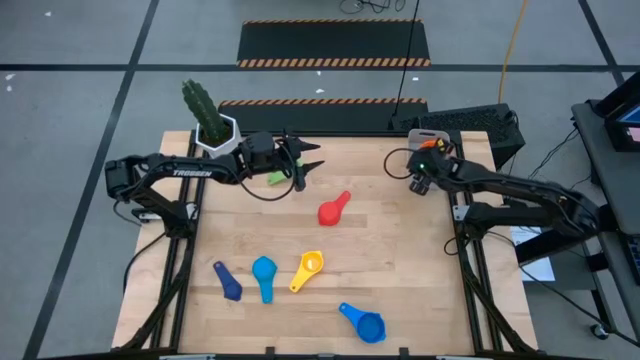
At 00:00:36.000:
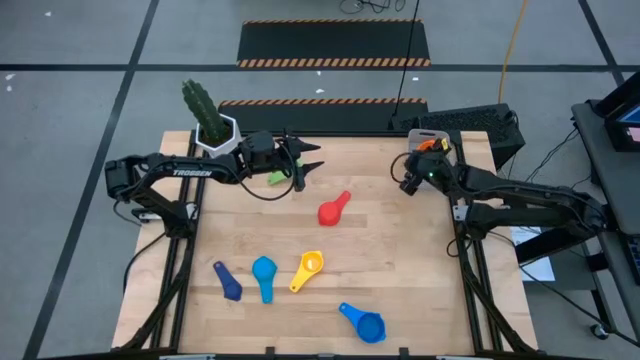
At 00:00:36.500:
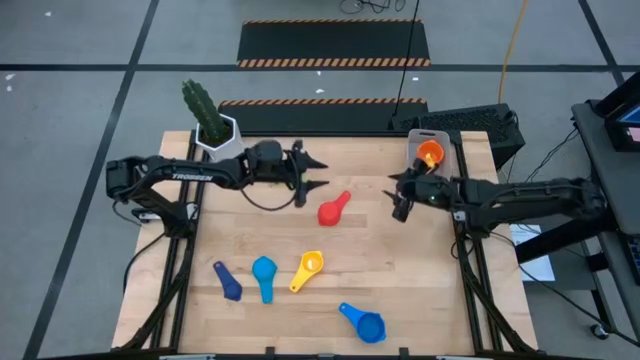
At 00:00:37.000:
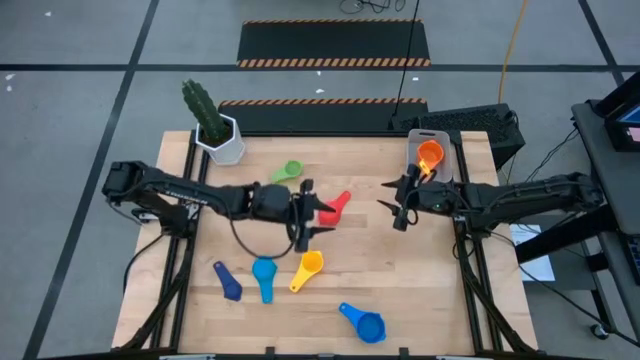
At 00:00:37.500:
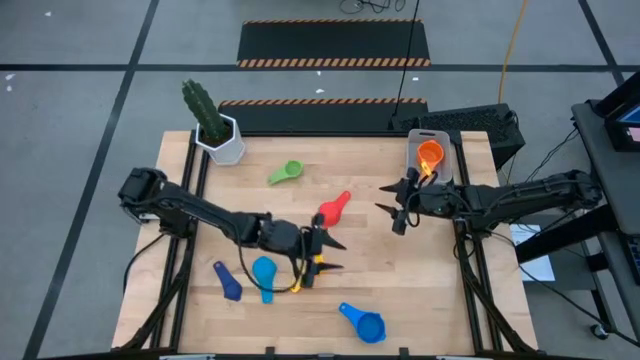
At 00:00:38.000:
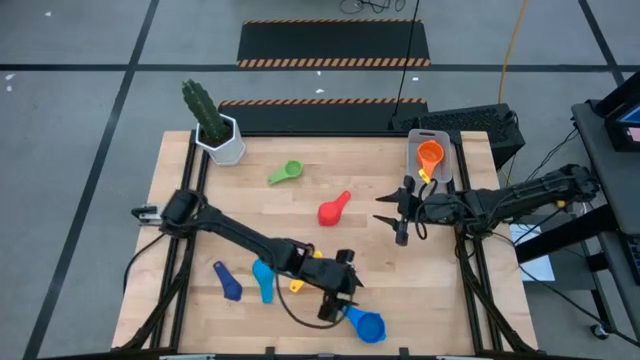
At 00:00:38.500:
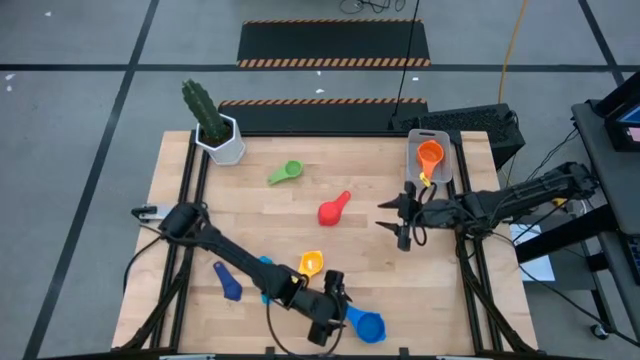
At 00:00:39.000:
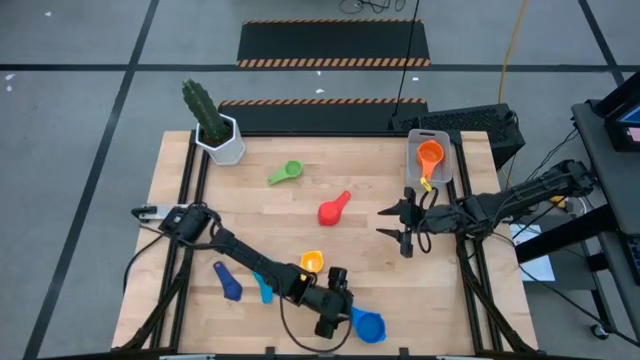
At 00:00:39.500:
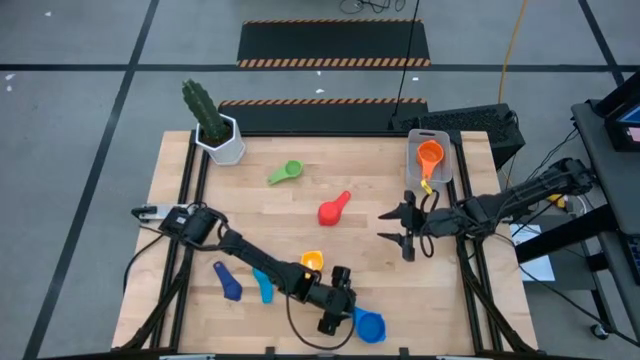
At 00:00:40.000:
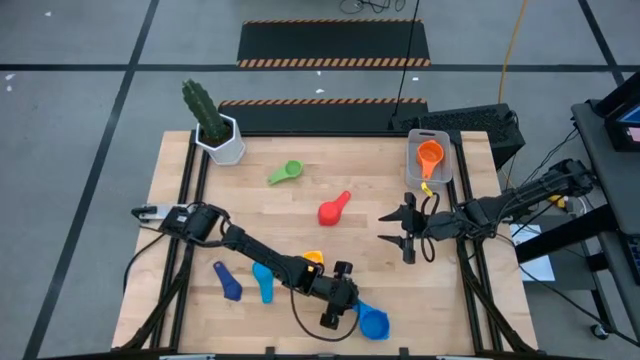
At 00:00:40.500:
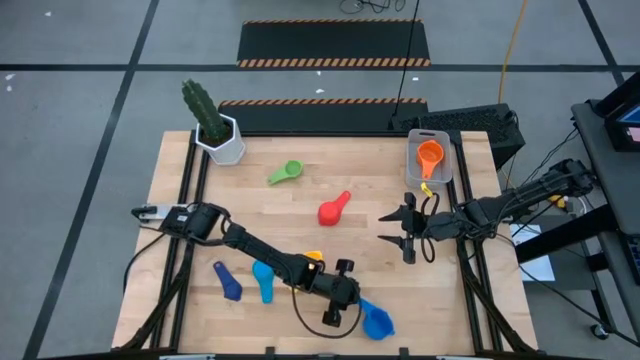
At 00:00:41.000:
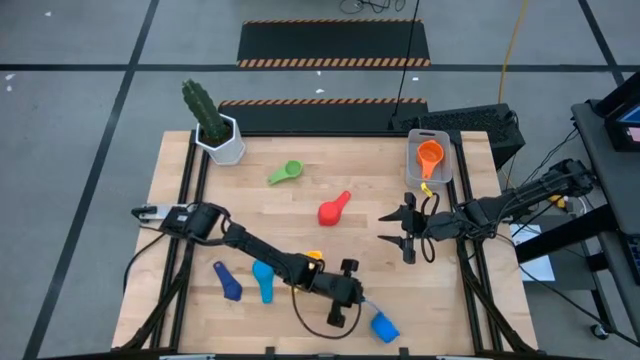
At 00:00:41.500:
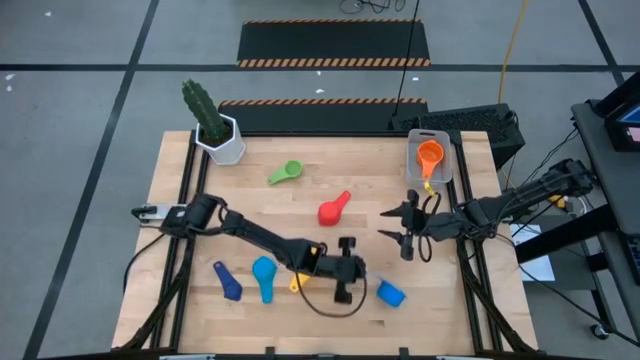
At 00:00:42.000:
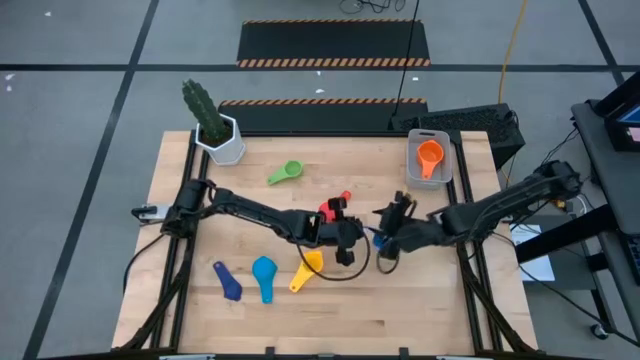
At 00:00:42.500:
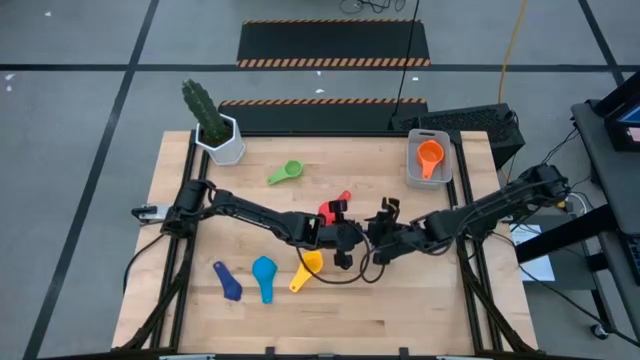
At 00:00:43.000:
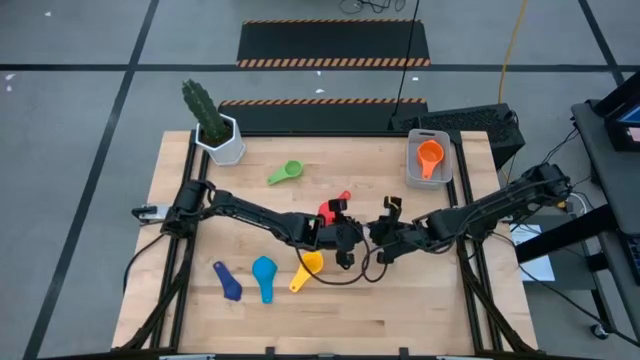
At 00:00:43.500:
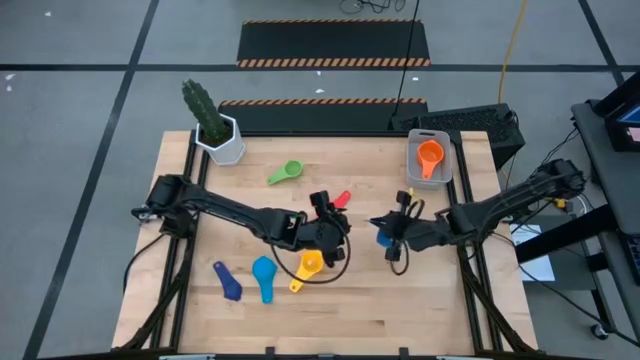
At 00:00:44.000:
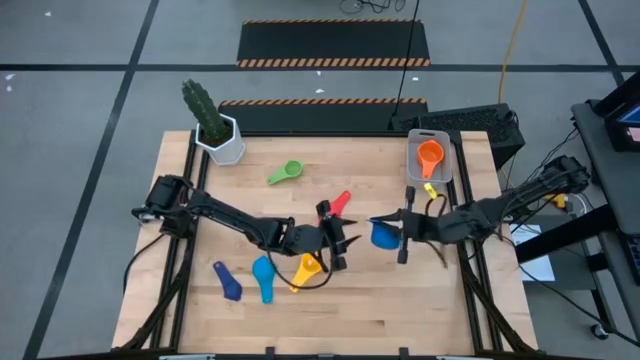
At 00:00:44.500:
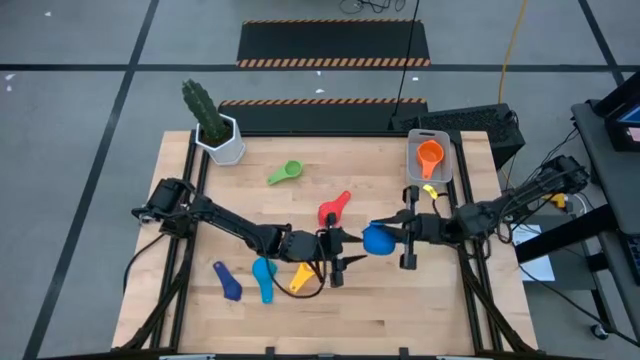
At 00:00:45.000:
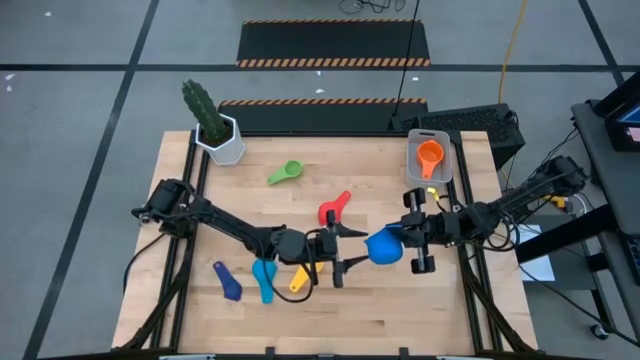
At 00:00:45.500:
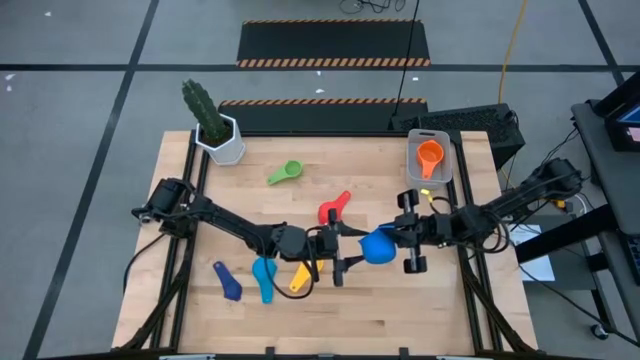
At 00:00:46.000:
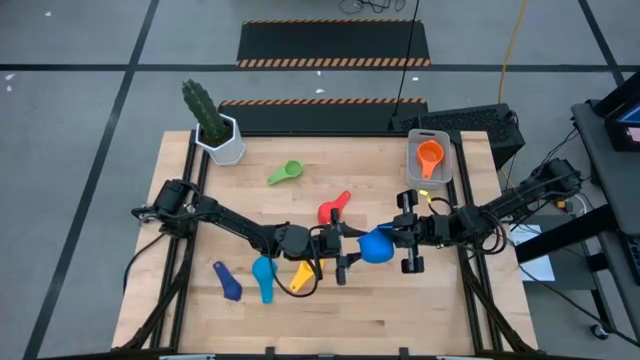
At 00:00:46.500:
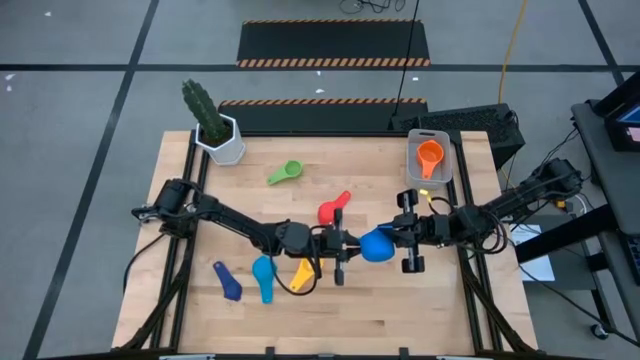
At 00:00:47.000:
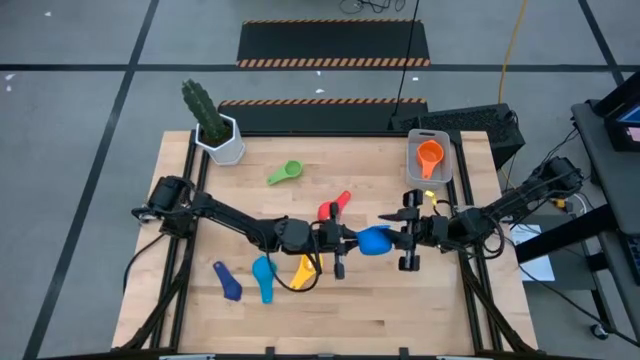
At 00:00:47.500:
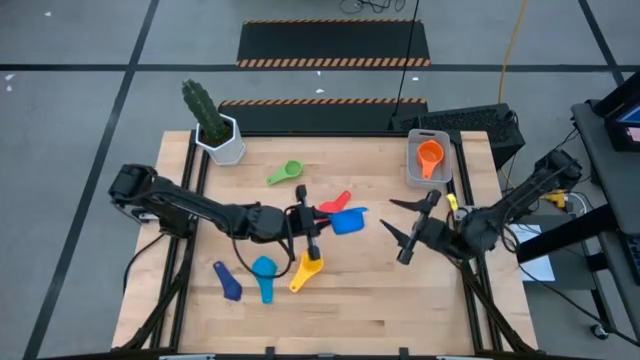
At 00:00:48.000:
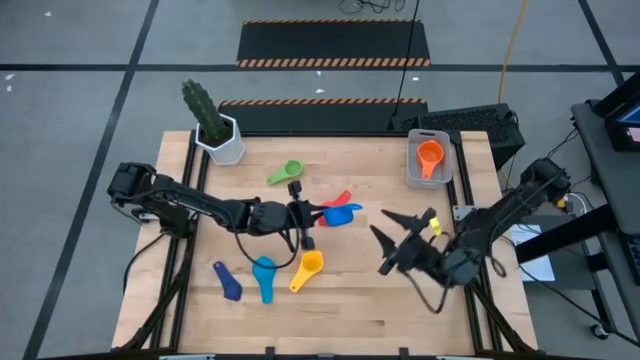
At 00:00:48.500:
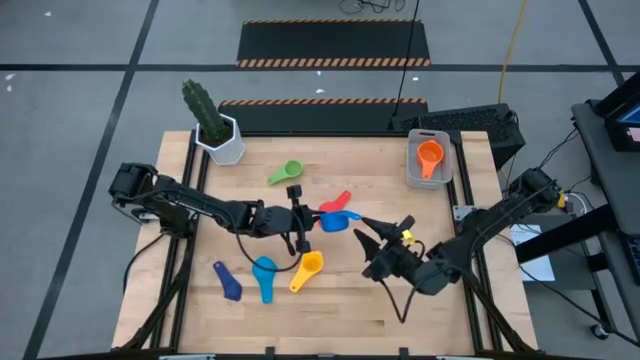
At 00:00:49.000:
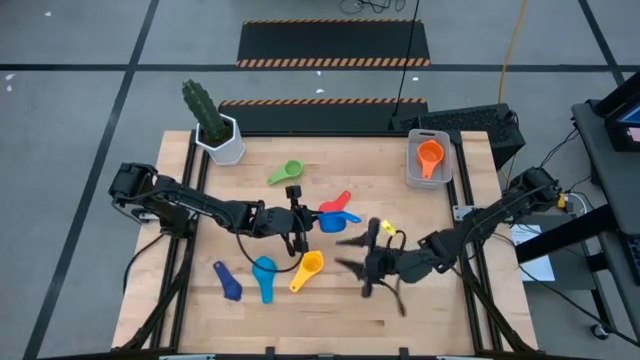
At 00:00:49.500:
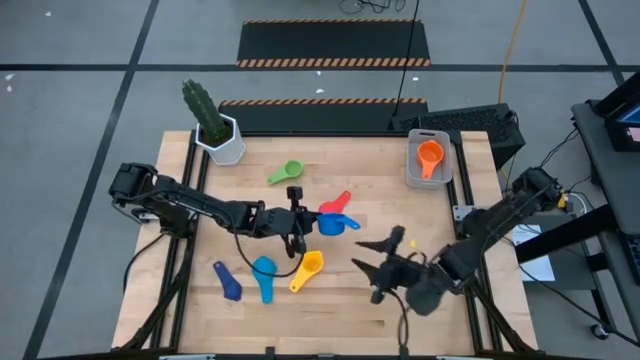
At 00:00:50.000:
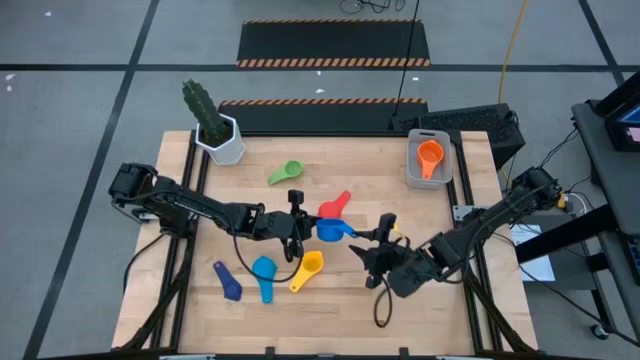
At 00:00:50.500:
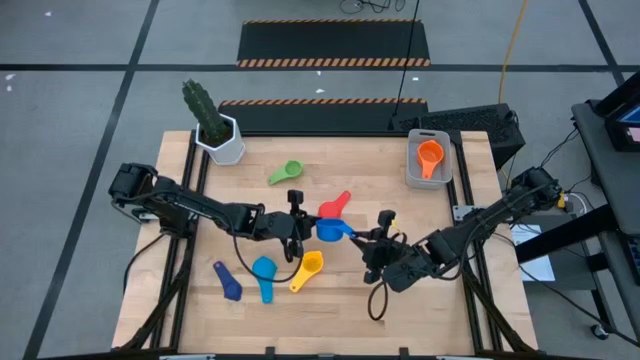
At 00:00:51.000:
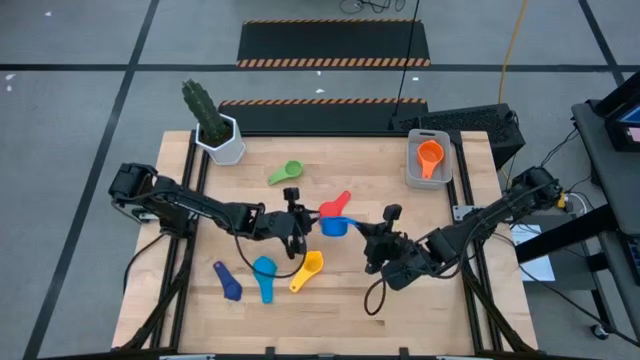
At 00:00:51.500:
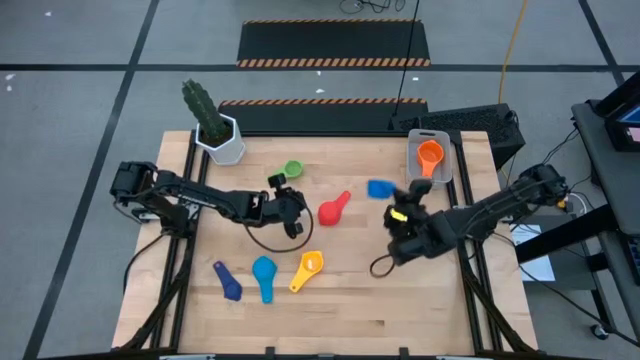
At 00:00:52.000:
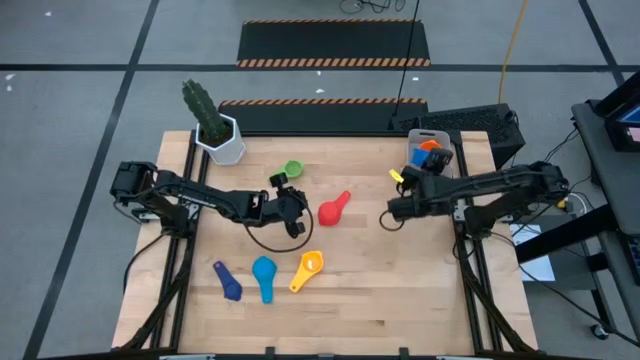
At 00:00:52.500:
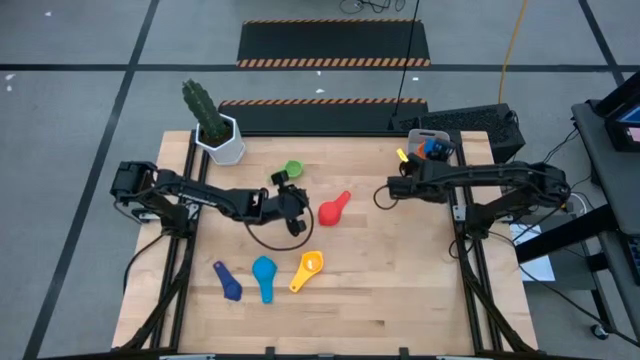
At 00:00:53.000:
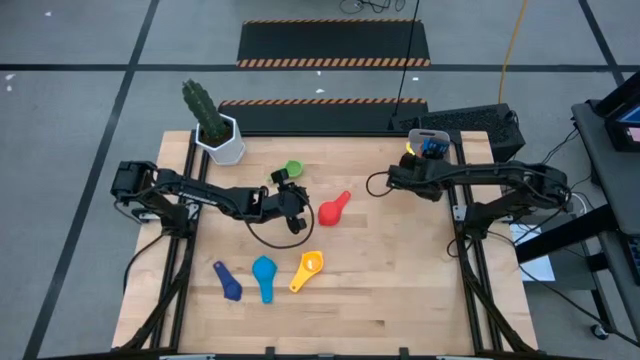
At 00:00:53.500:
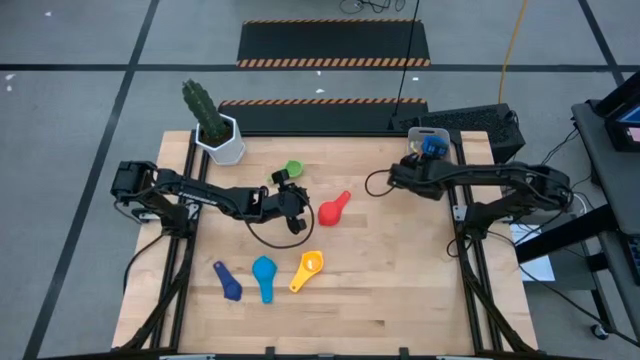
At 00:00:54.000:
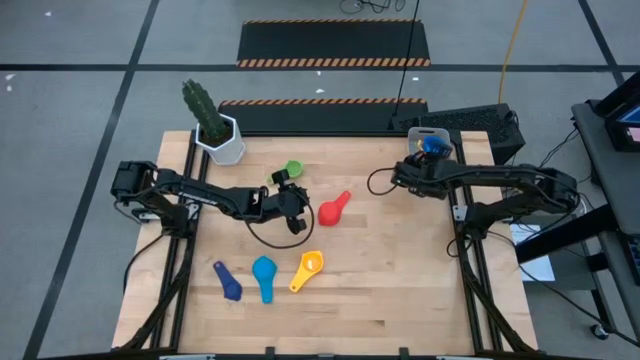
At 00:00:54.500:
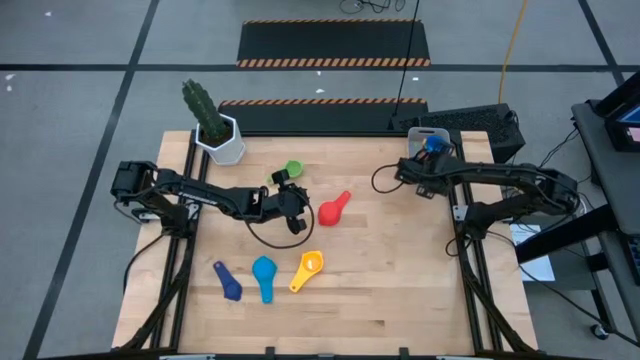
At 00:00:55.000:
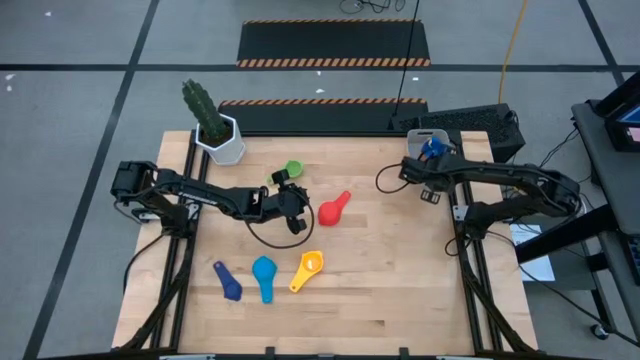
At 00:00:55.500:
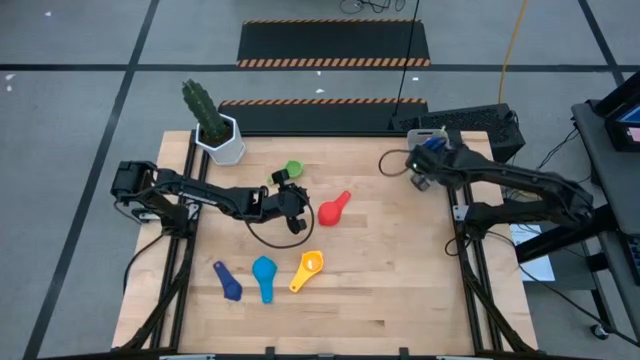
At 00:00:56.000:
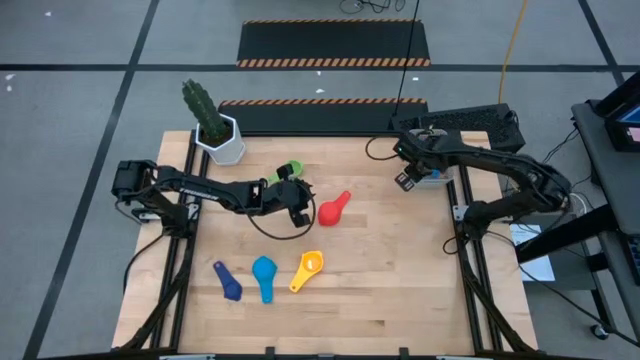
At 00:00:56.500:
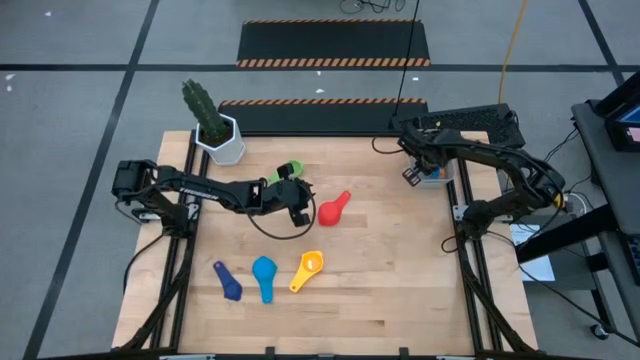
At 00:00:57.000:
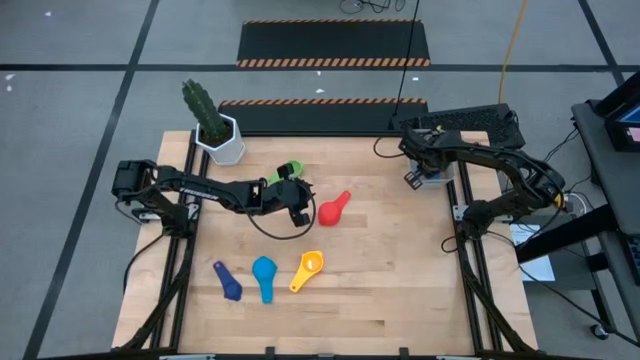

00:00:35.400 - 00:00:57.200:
Task: Nest measuring cups in basket
Stack the dark blue measuring cup on top of the orange measuring cup in the gray bin
